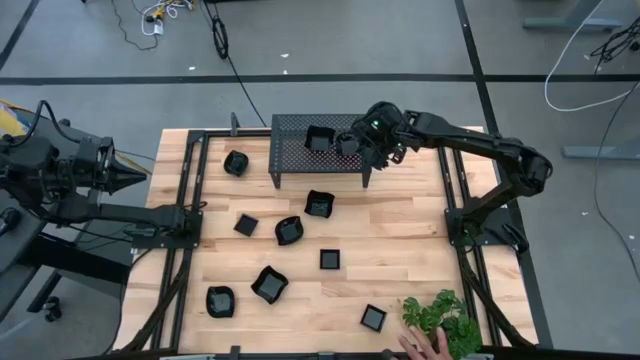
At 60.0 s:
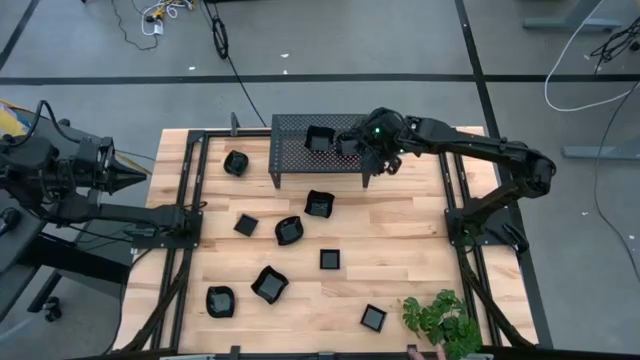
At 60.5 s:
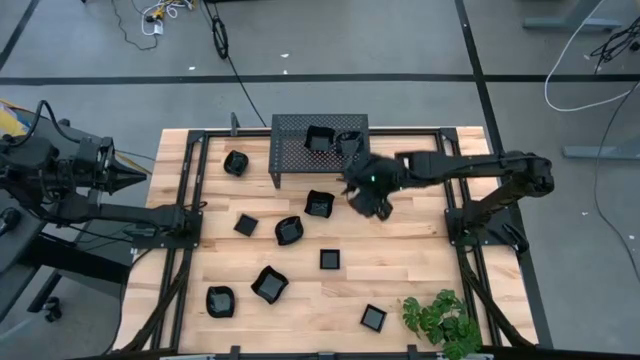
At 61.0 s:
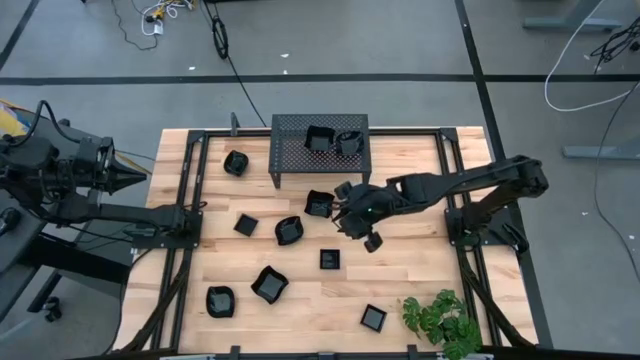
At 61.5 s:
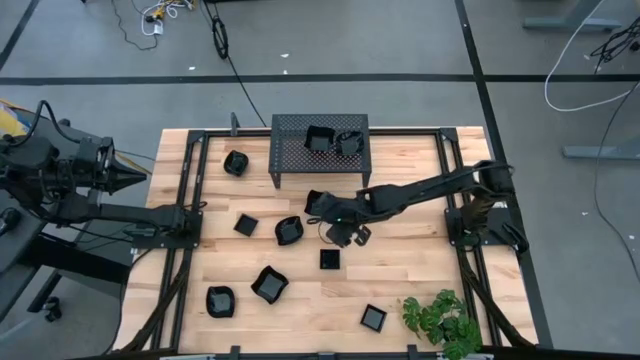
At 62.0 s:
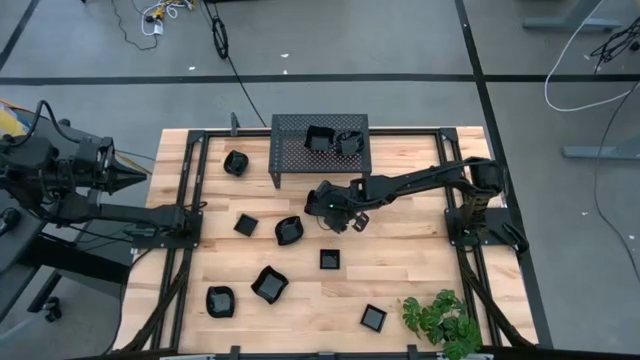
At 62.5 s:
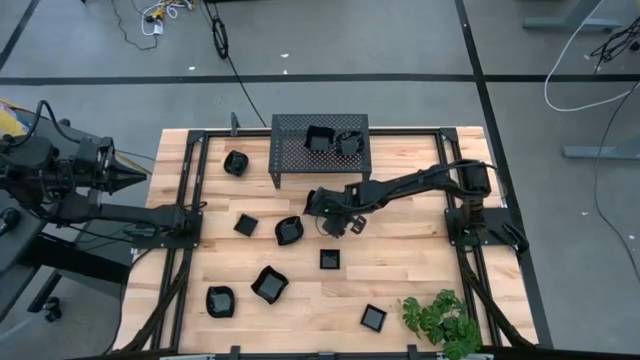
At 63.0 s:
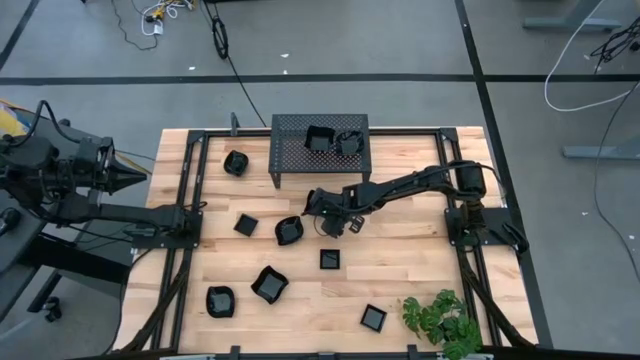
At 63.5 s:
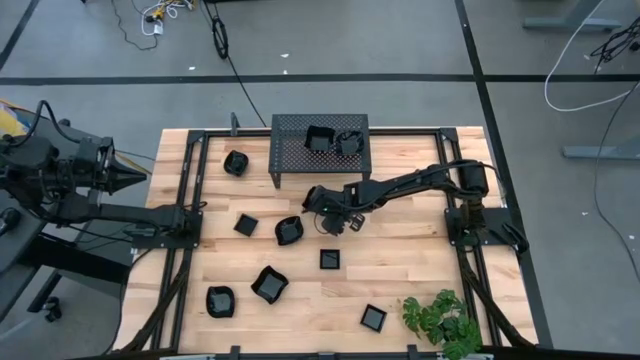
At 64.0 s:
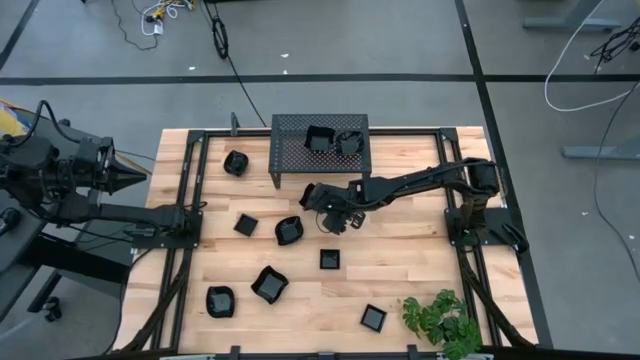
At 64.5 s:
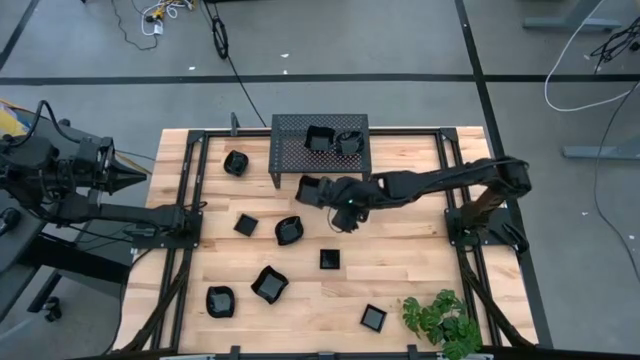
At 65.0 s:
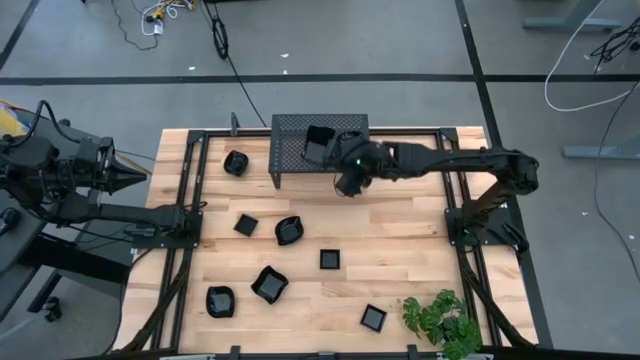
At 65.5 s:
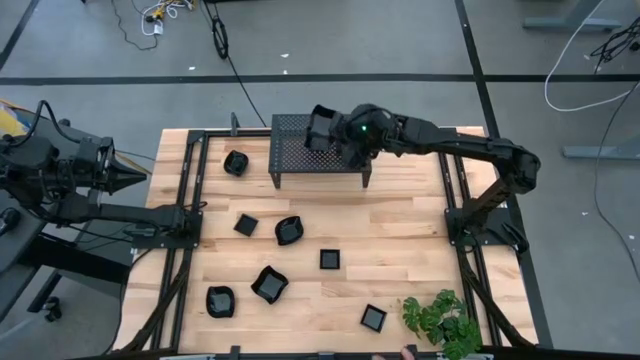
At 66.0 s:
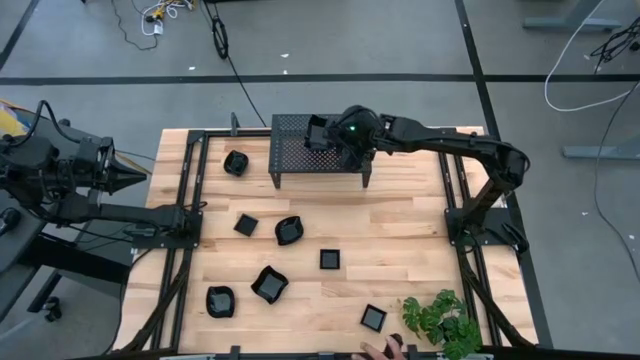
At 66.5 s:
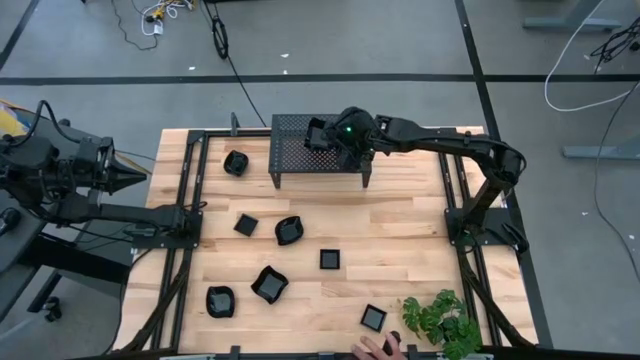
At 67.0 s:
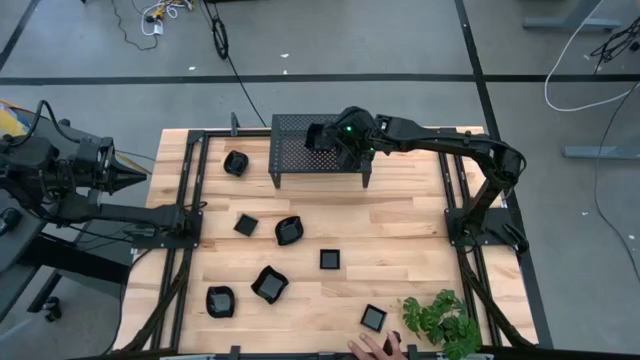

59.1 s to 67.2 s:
Task: Pick & Place Mini shaped plates
Stack the distorted square plate on top of the other distorted square plate on the shelf

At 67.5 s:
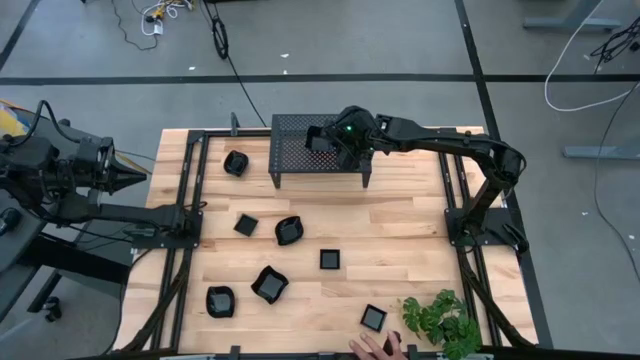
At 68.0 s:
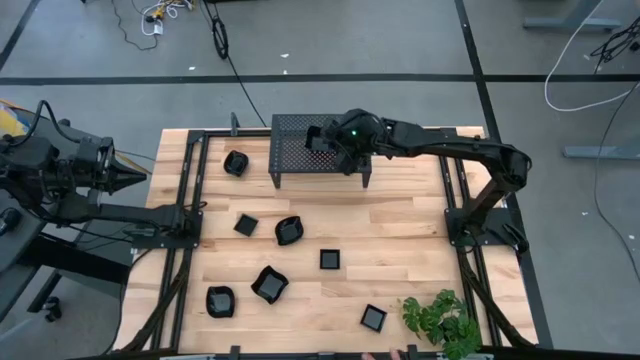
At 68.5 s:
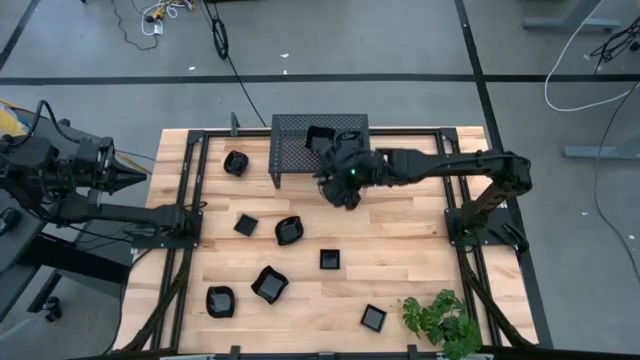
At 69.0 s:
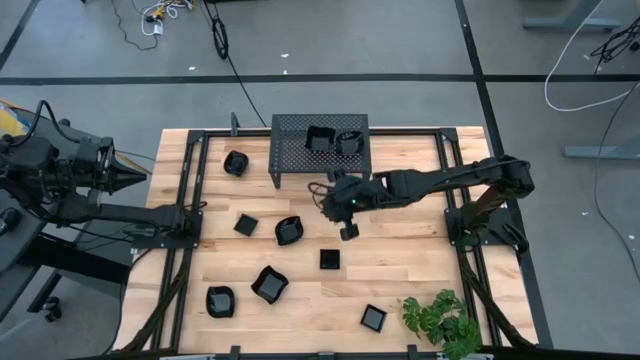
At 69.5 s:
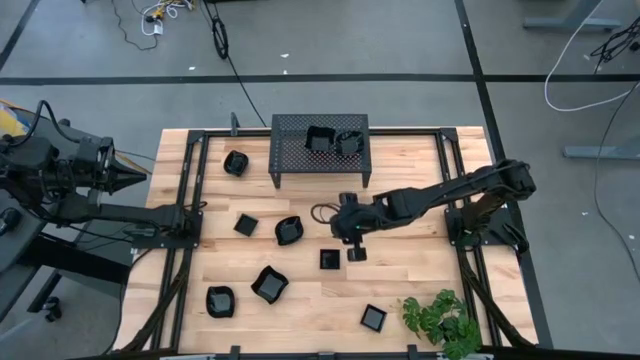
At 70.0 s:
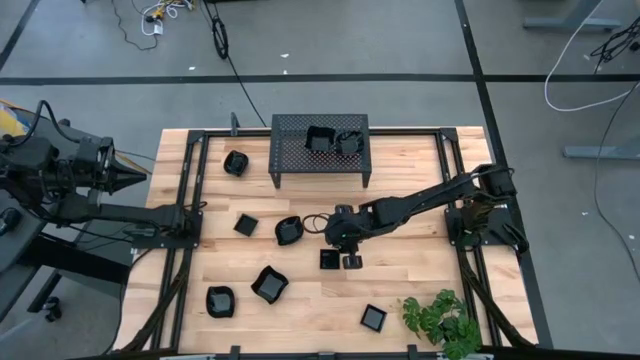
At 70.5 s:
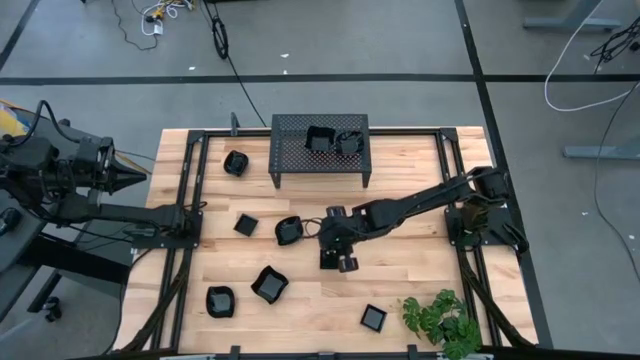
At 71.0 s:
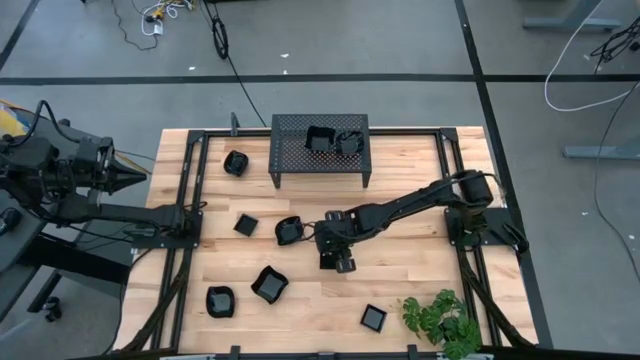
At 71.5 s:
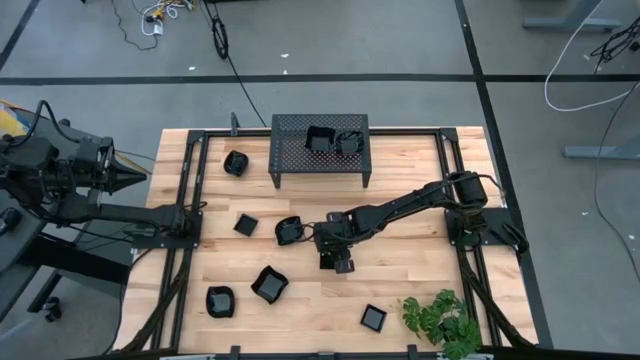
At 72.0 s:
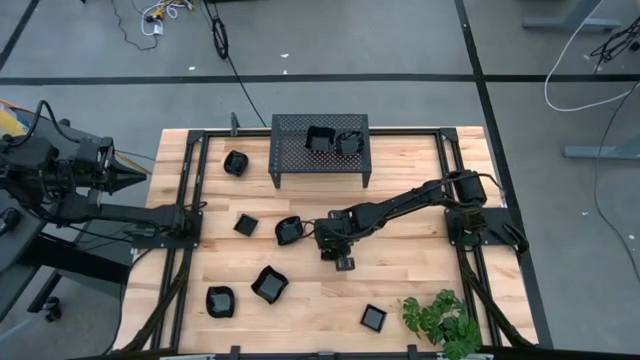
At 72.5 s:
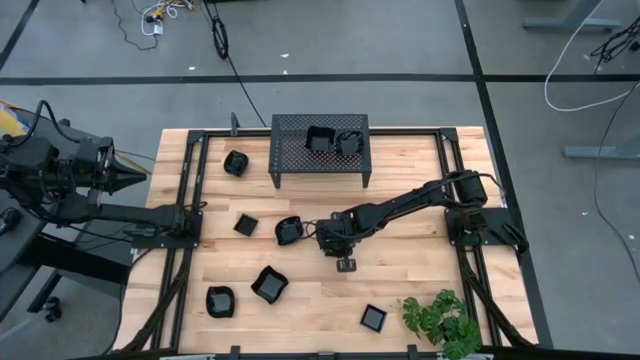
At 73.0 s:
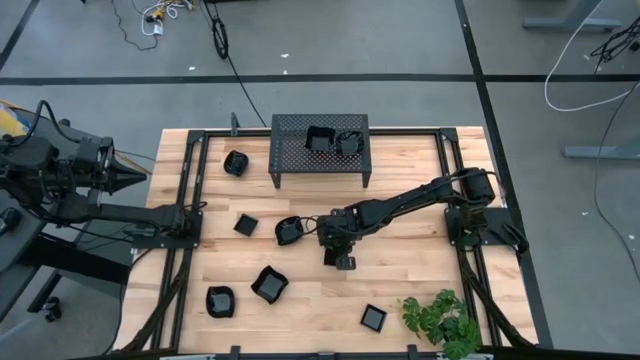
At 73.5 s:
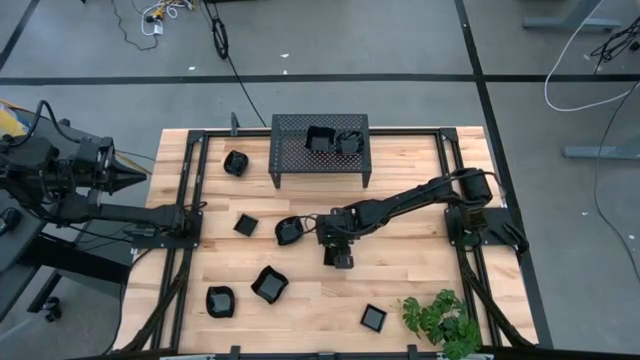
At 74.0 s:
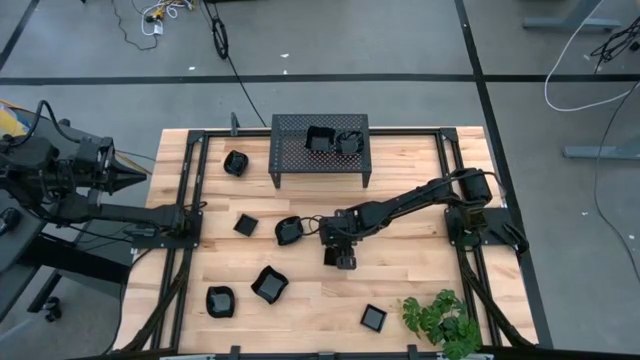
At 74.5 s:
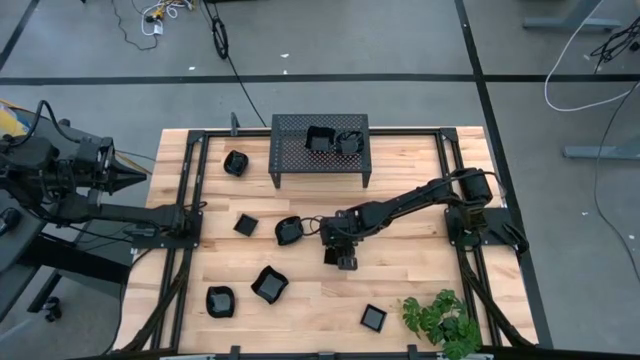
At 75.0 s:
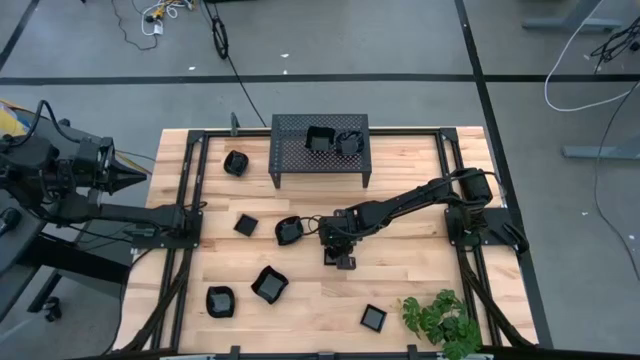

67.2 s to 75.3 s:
Put the square plate on the shelf

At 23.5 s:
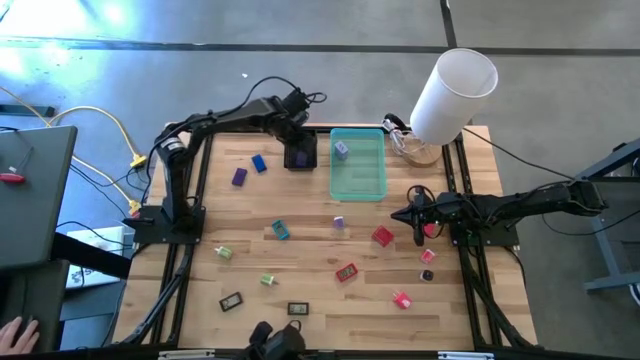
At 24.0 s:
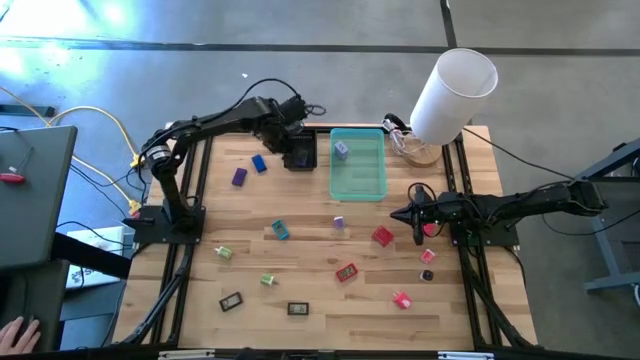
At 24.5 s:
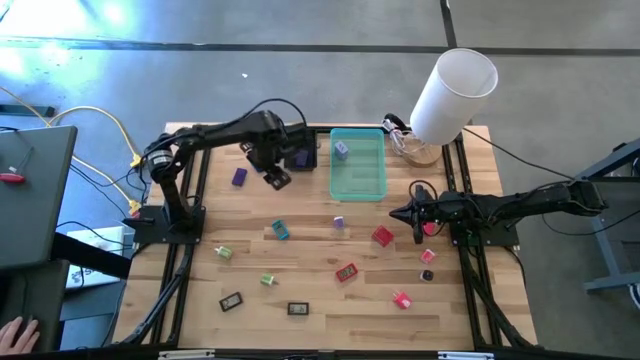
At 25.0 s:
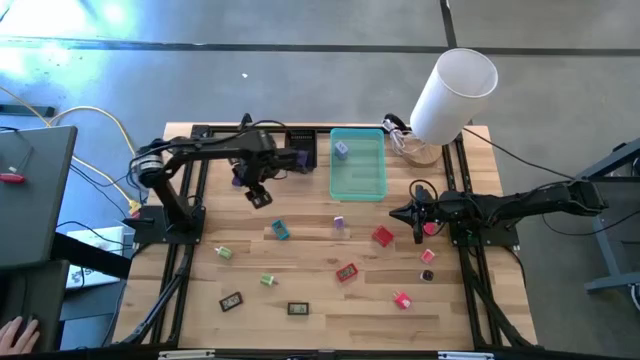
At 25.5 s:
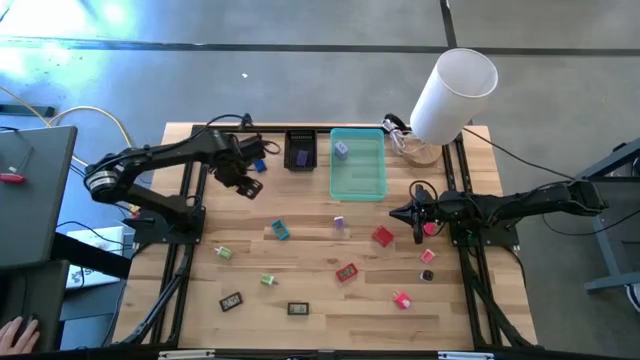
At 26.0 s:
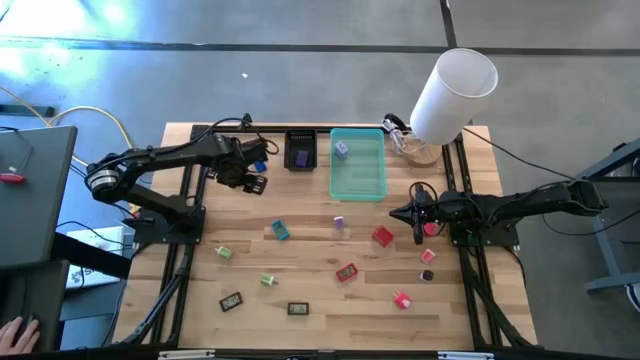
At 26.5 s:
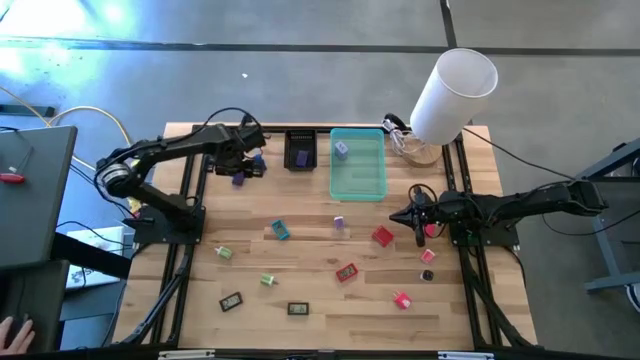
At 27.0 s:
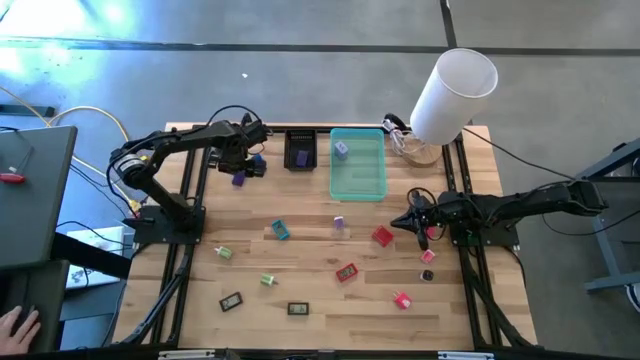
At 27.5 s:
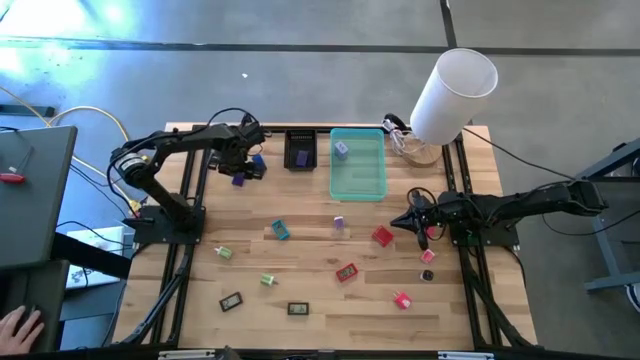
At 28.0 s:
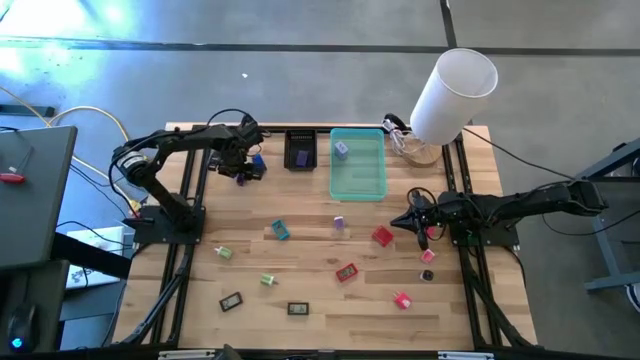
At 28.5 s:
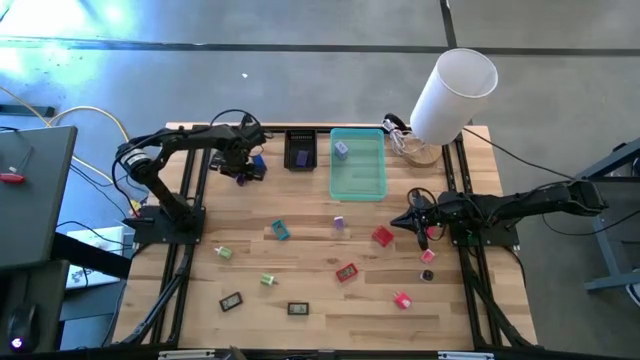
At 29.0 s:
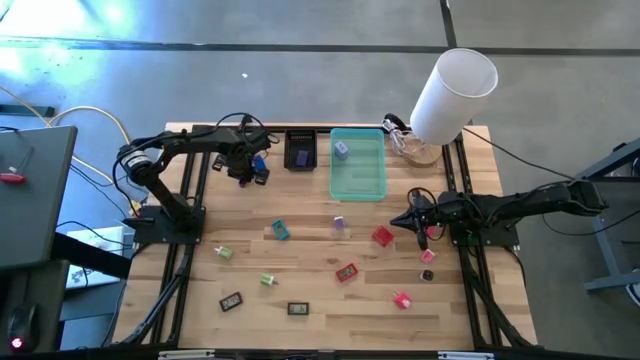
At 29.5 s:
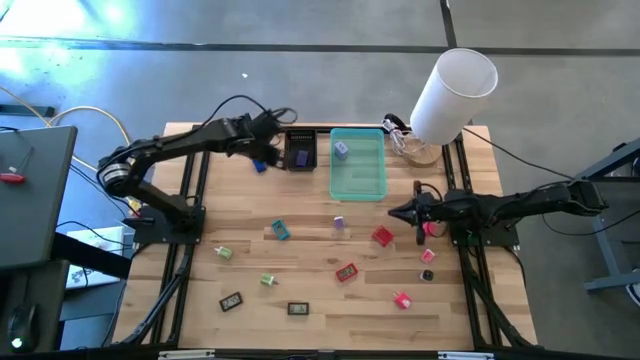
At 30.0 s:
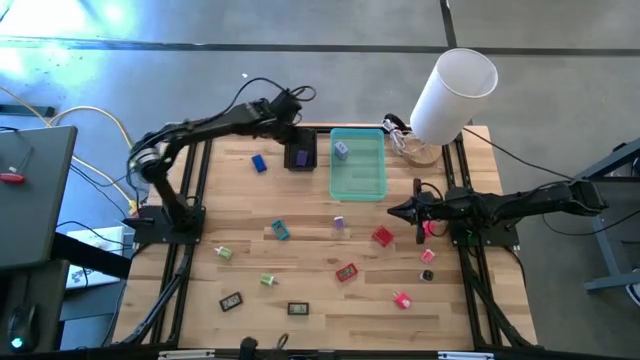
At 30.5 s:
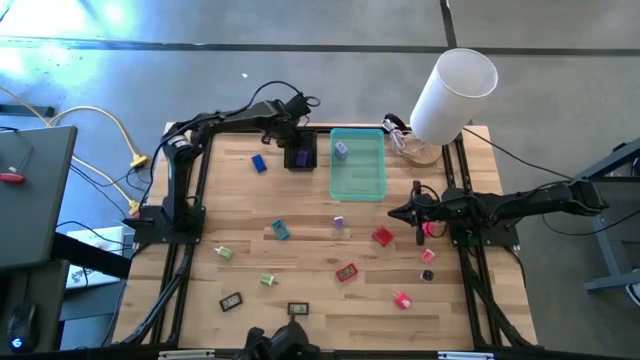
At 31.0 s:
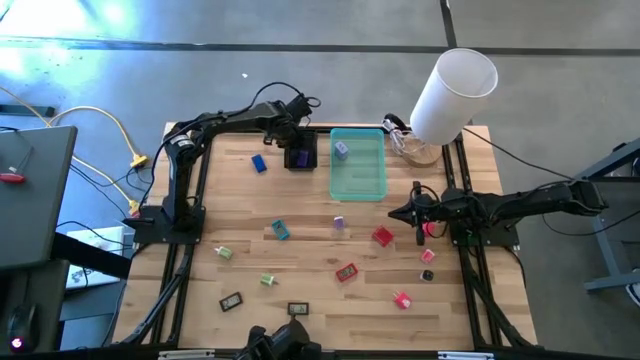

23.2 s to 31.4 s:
Task: Pick & Place Office items
Put the violet digital timer into the black bin
